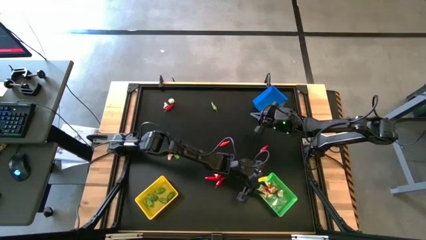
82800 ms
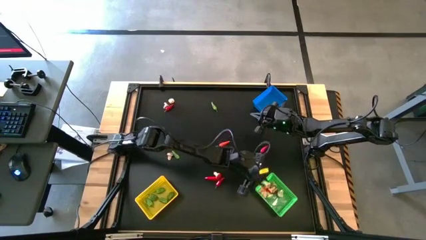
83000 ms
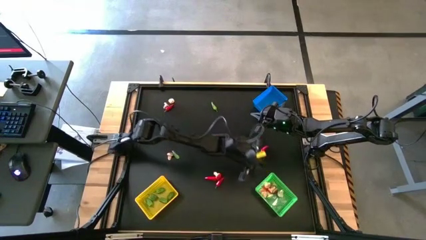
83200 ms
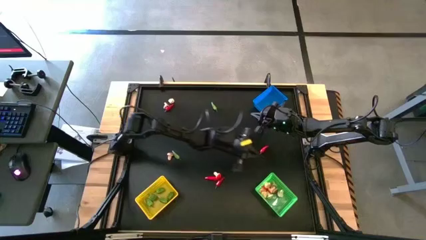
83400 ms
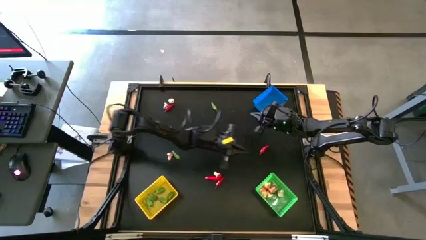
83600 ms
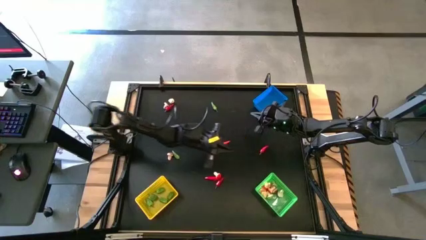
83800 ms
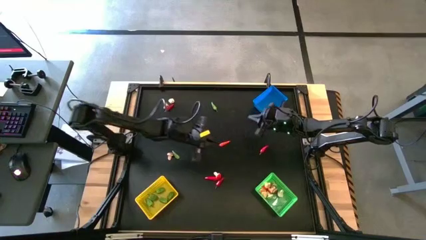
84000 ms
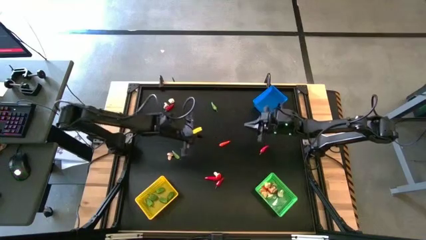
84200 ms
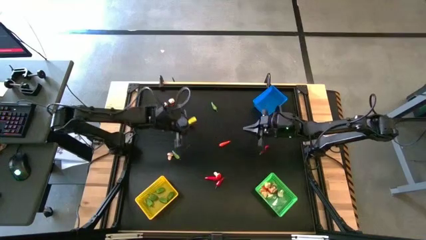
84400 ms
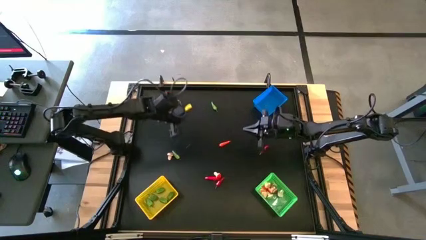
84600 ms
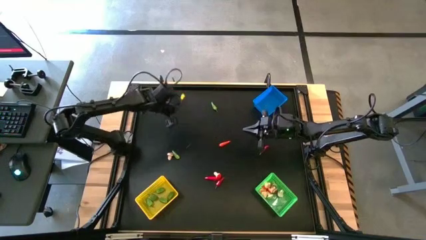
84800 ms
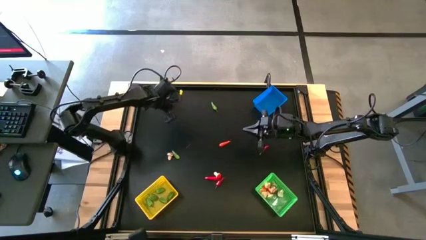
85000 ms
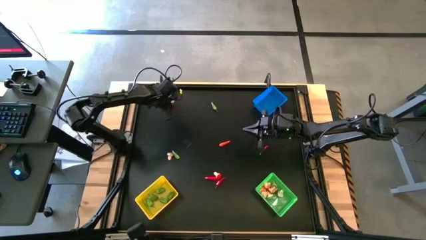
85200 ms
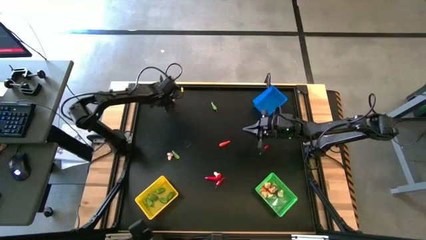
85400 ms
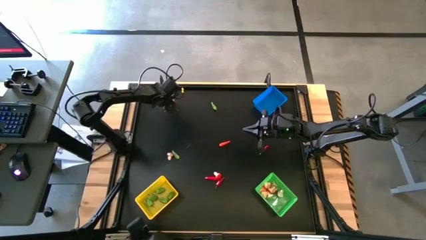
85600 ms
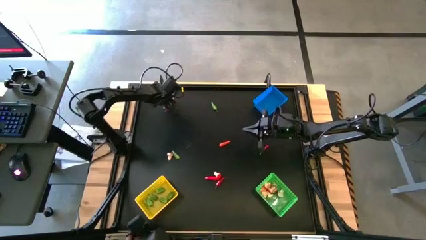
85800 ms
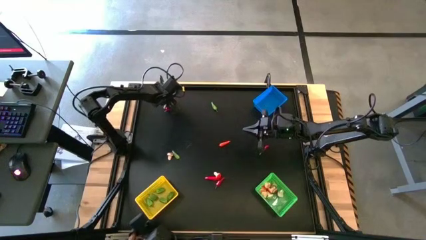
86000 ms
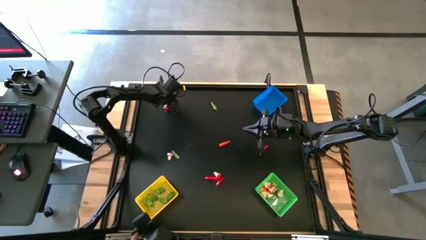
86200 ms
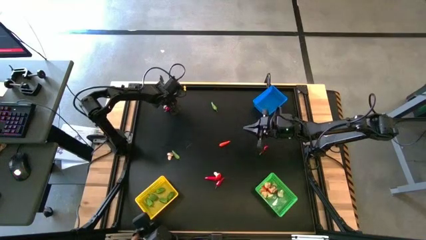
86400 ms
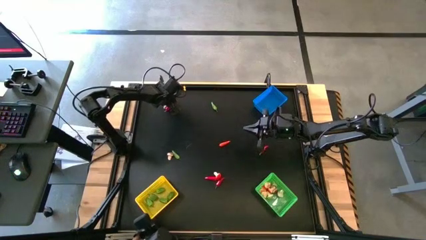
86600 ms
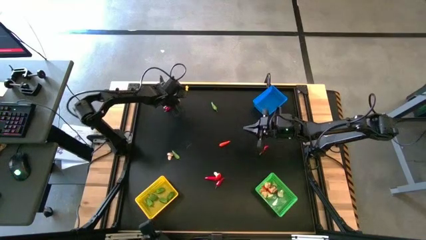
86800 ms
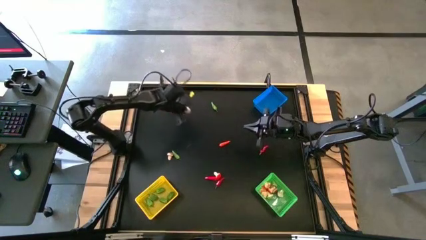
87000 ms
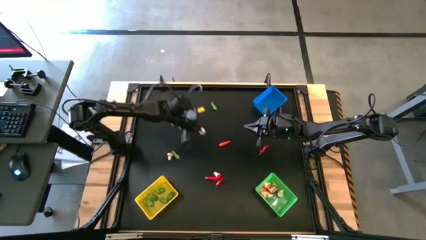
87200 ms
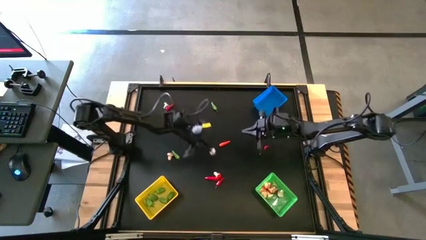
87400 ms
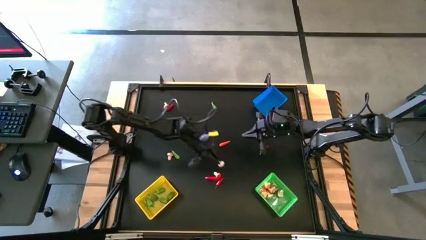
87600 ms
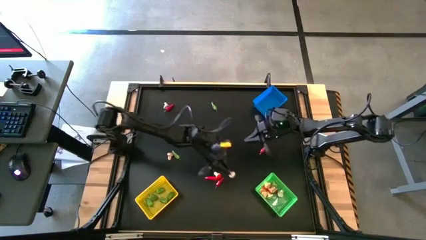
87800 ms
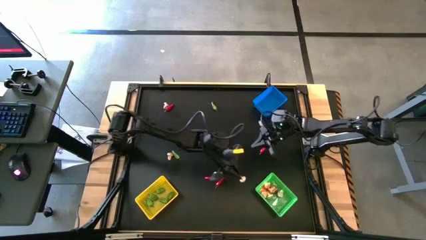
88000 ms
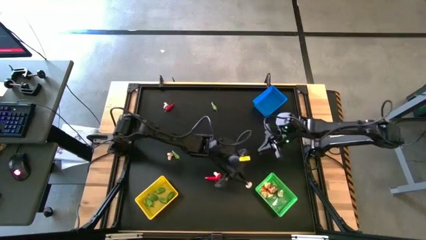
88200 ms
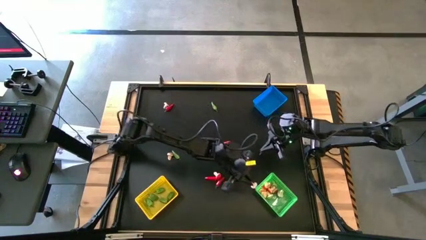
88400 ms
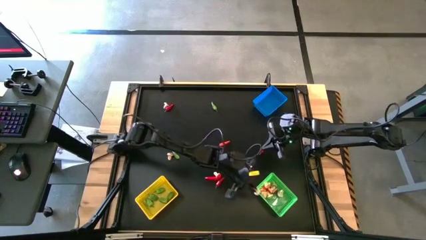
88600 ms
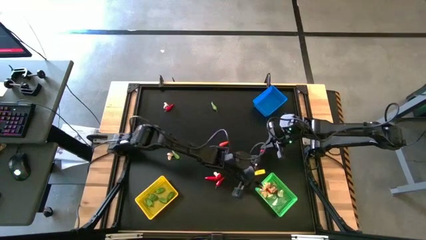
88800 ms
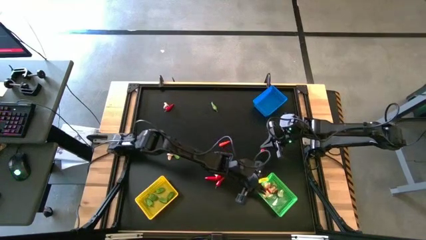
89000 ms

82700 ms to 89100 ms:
Task: Sort produce into baskets
Put the red mushroom into the green bin

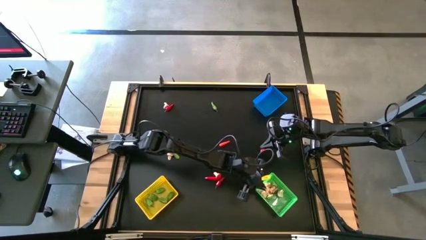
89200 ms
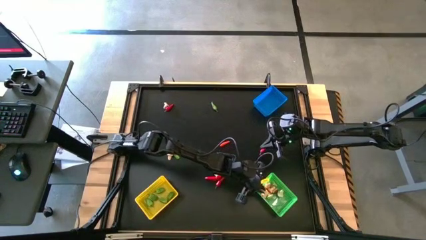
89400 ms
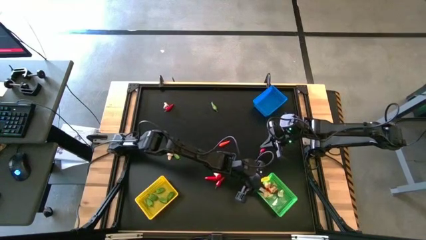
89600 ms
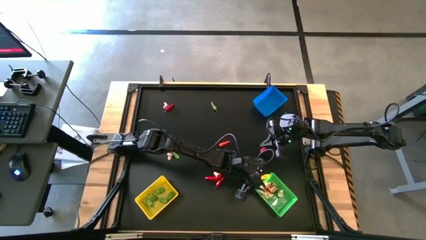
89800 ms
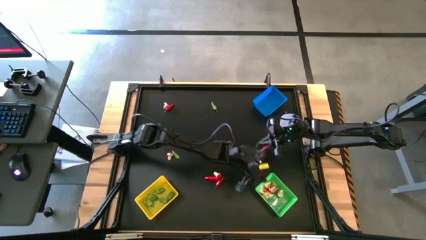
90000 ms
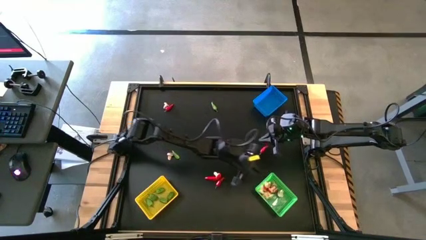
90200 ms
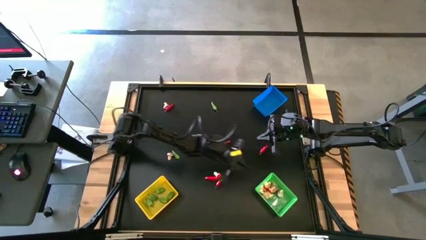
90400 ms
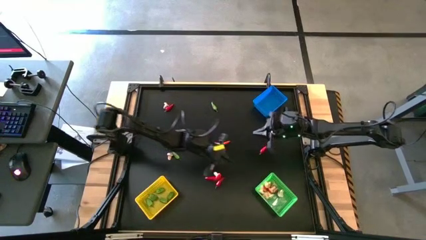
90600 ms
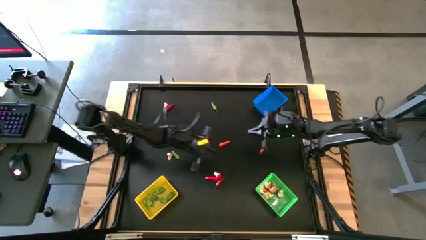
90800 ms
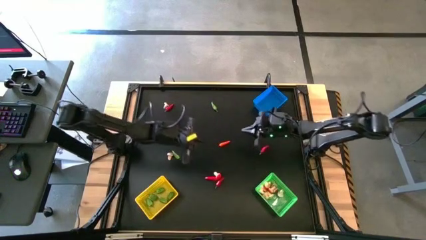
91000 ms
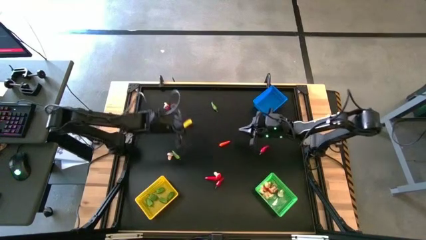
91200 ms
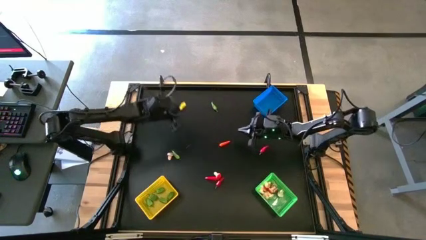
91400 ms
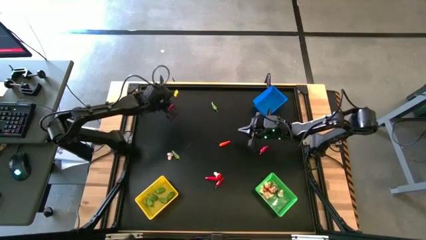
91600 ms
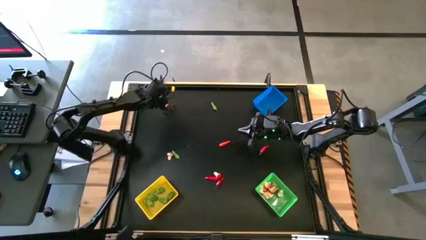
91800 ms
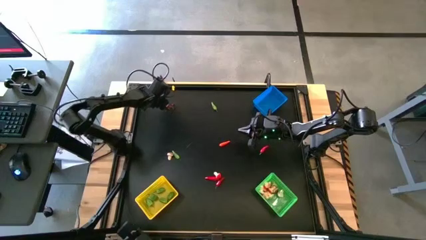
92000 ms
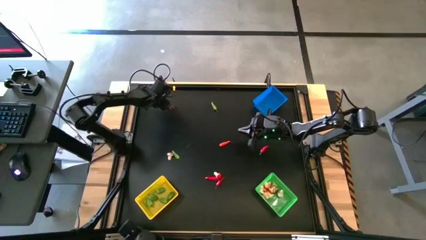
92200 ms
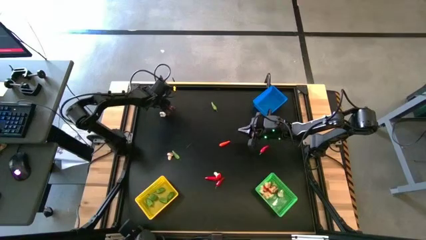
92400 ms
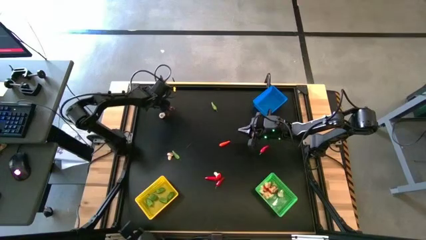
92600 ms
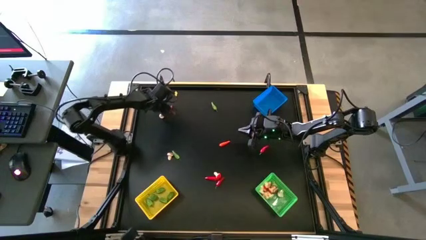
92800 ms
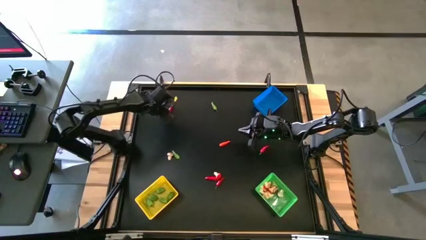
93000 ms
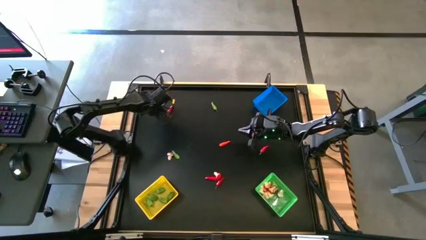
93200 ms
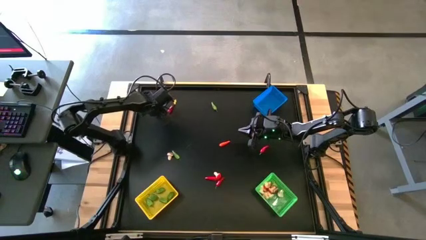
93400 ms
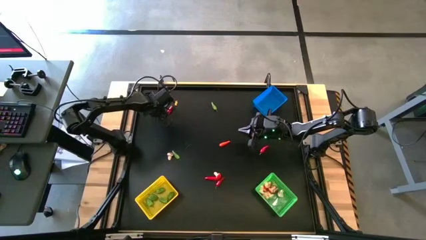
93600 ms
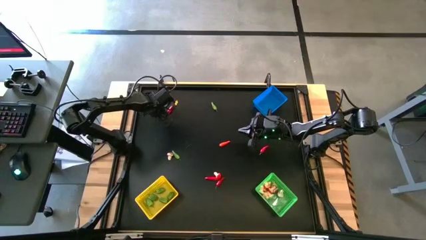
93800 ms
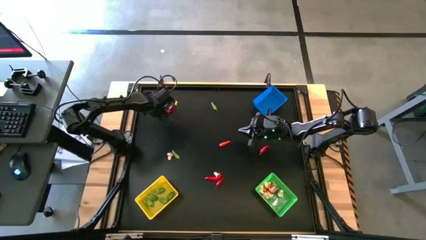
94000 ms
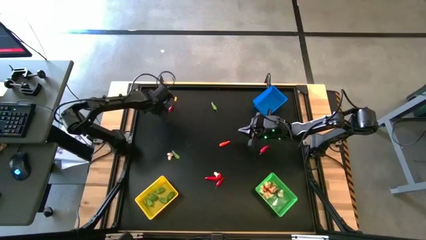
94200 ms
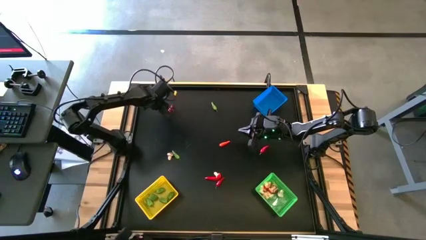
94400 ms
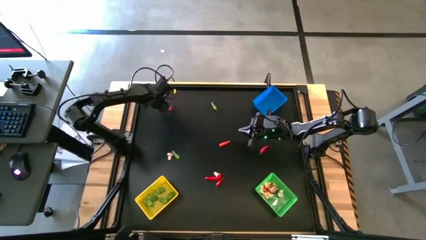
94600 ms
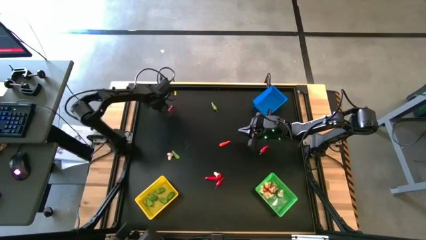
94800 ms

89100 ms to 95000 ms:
Put the red mushroom into the green bin

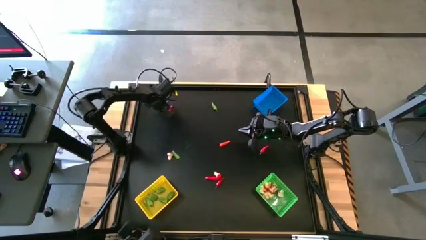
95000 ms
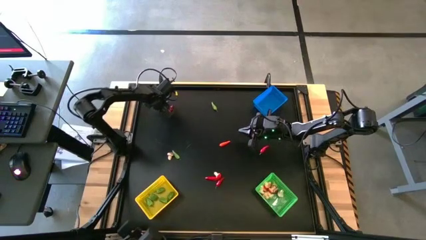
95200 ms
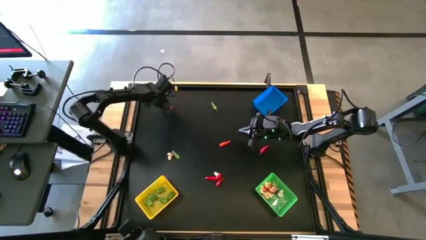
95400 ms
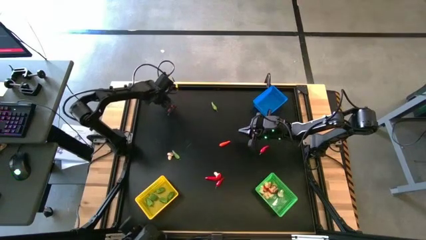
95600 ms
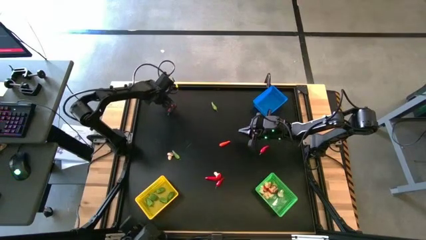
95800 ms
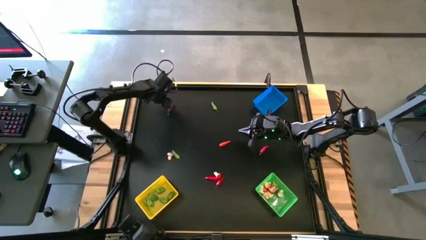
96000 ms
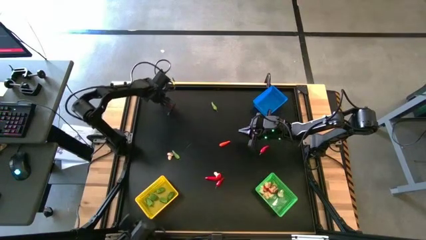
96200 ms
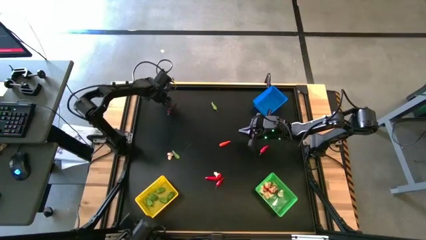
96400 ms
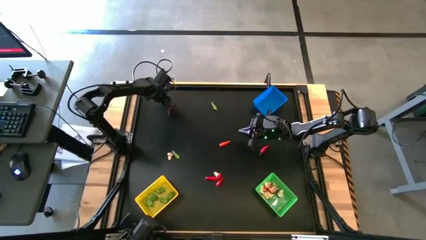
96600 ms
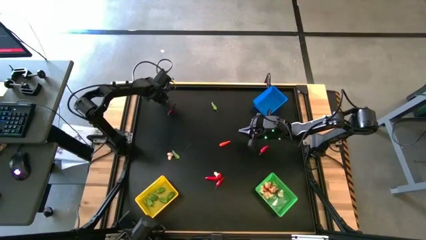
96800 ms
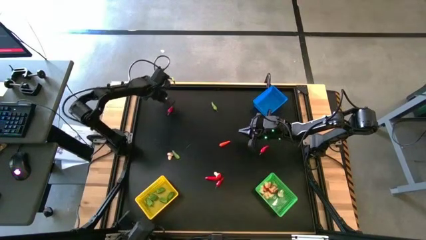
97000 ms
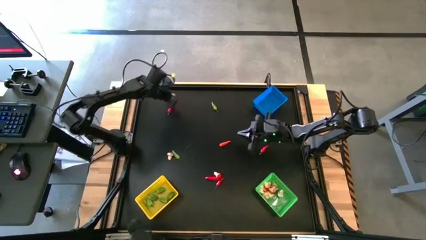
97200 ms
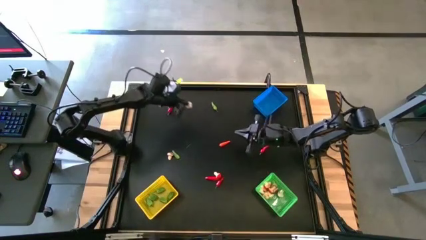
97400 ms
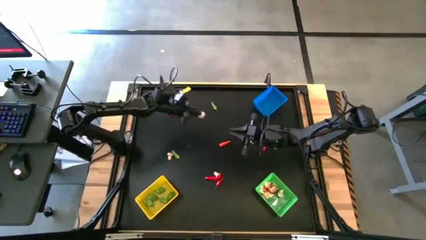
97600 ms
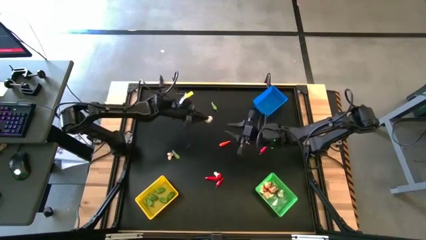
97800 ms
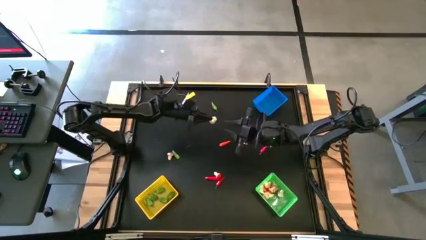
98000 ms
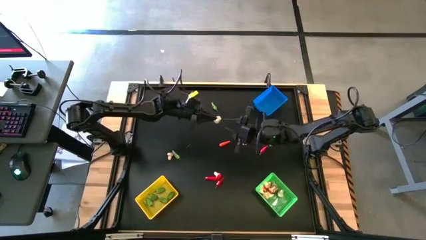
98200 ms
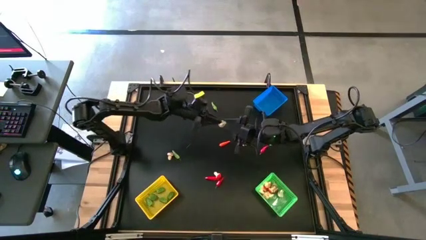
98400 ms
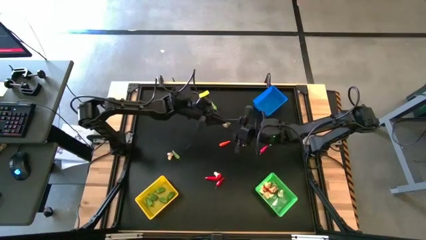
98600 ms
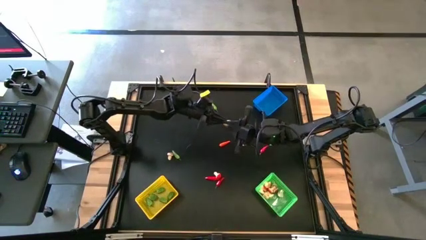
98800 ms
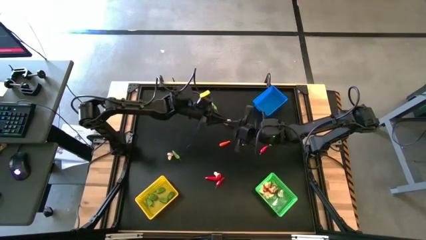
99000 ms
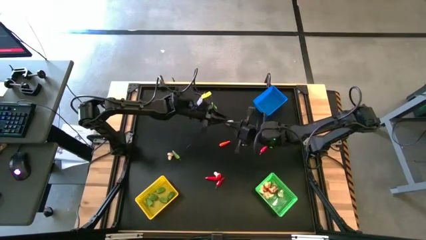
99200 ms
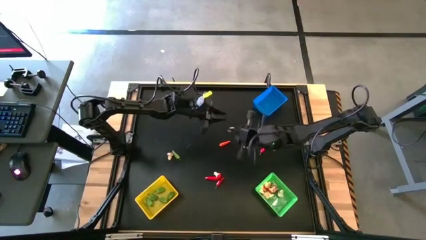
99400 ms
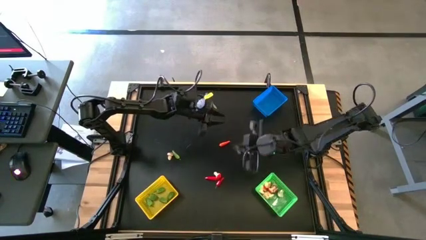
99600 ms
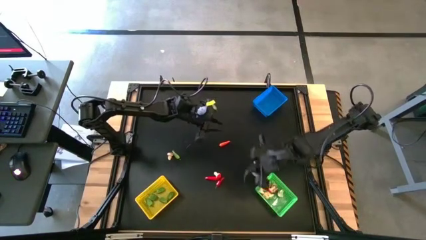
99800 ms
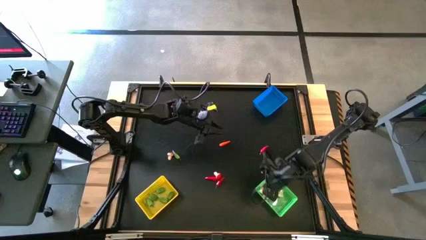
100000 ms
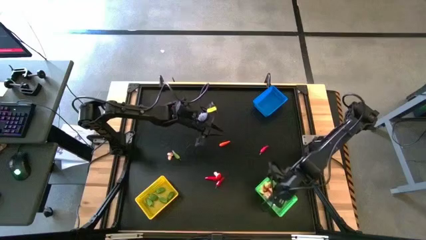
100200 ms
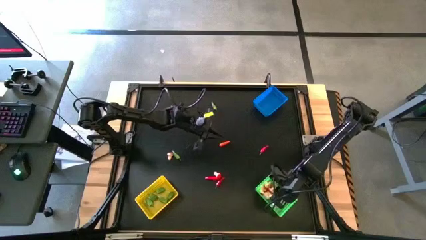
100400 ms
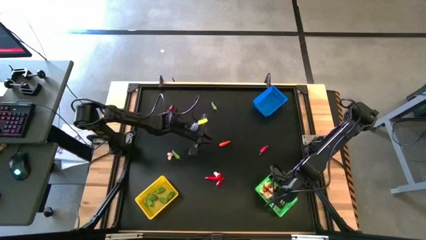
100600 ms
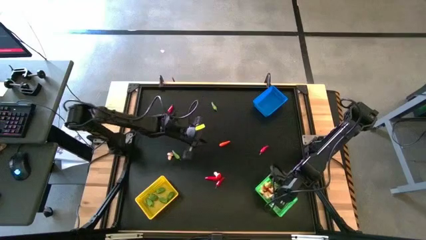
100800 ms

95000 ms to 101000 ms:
Put the red mushroom into the green bin
